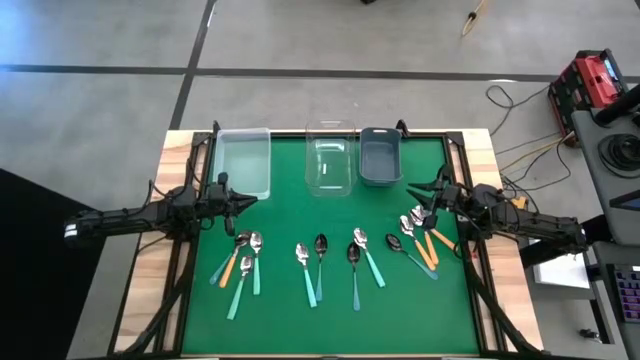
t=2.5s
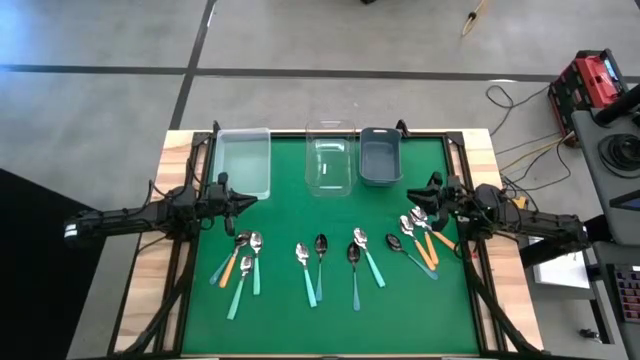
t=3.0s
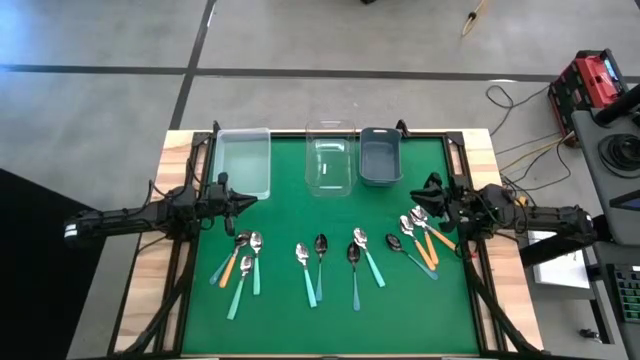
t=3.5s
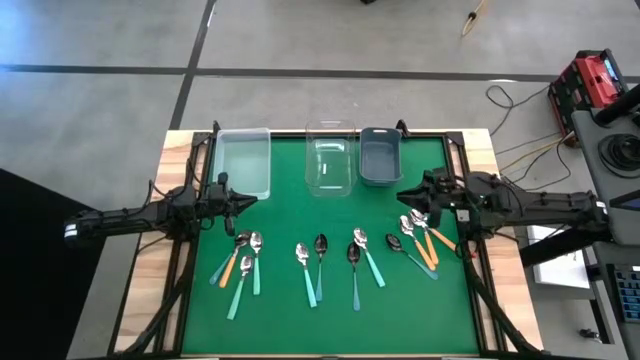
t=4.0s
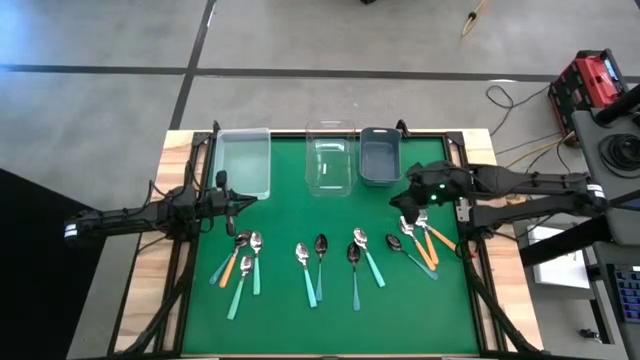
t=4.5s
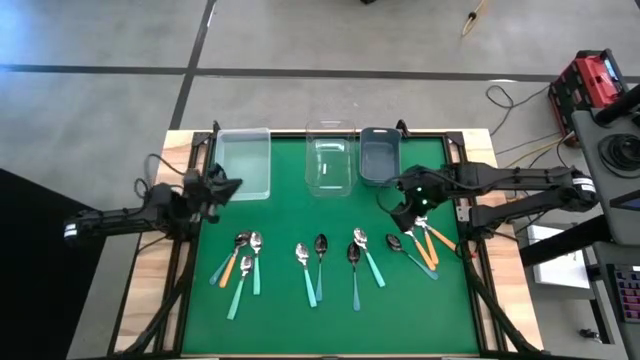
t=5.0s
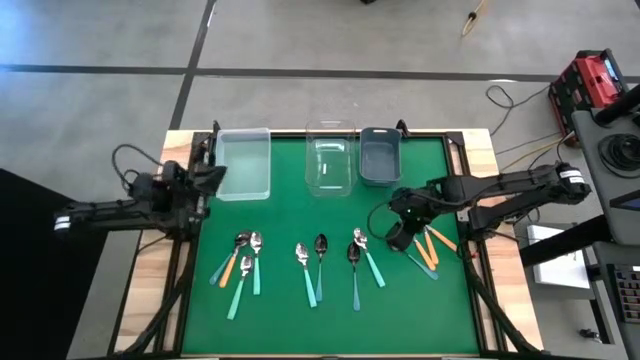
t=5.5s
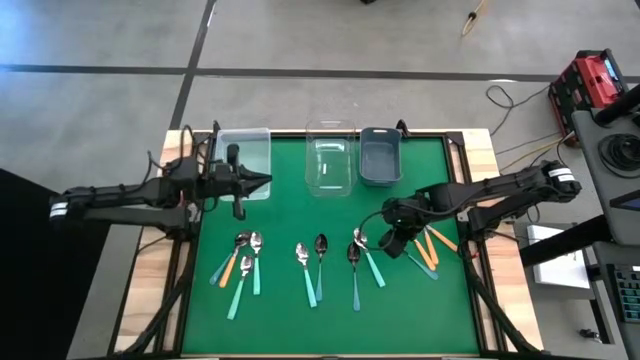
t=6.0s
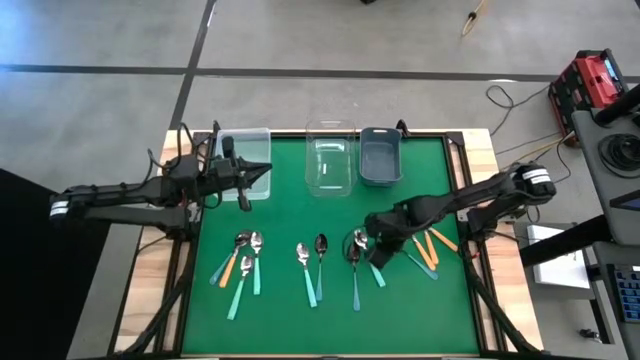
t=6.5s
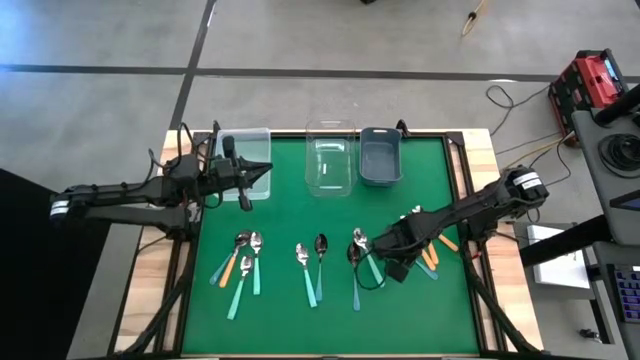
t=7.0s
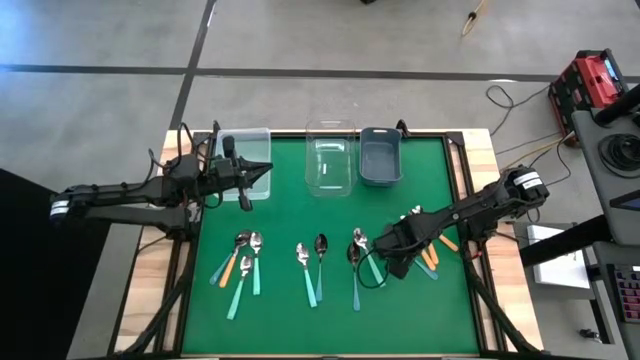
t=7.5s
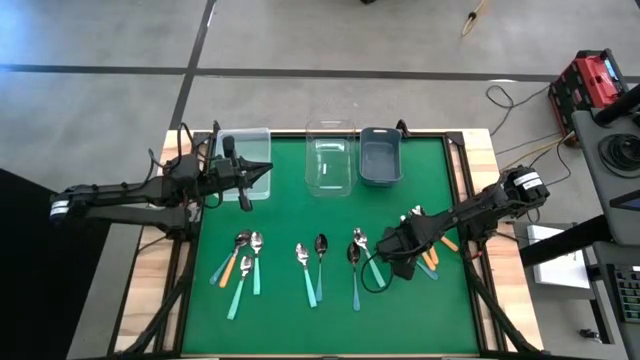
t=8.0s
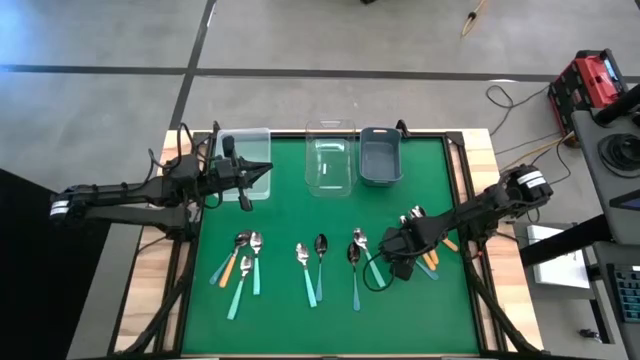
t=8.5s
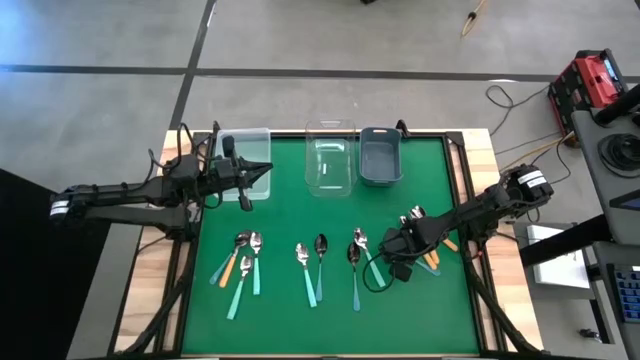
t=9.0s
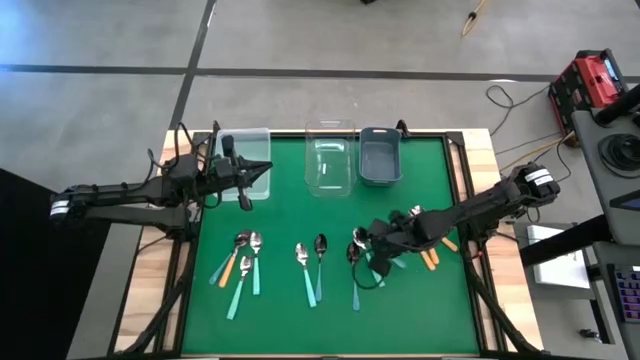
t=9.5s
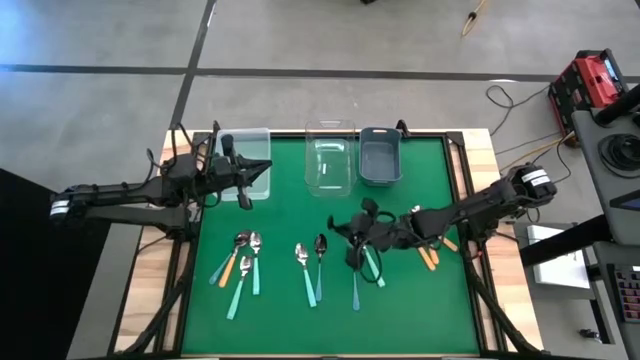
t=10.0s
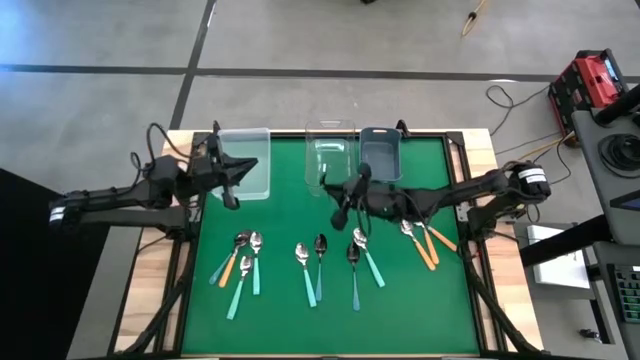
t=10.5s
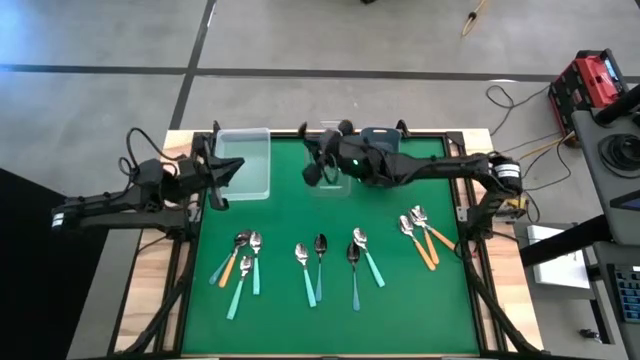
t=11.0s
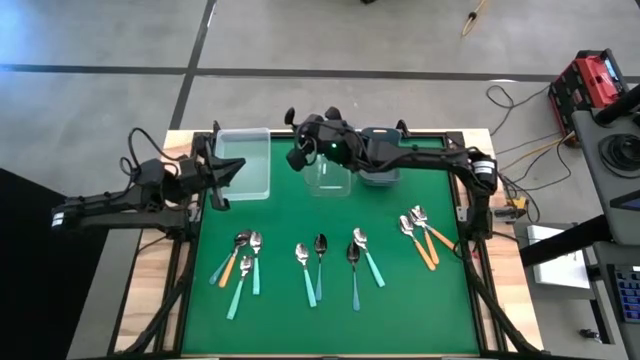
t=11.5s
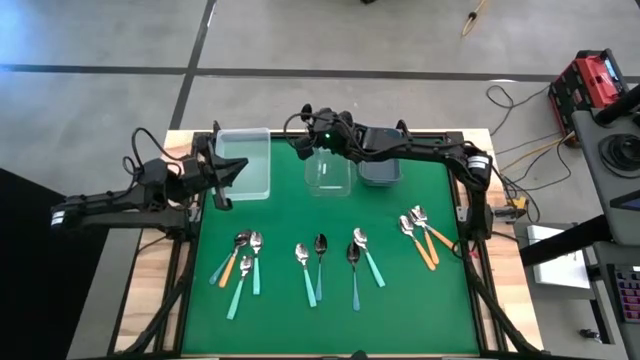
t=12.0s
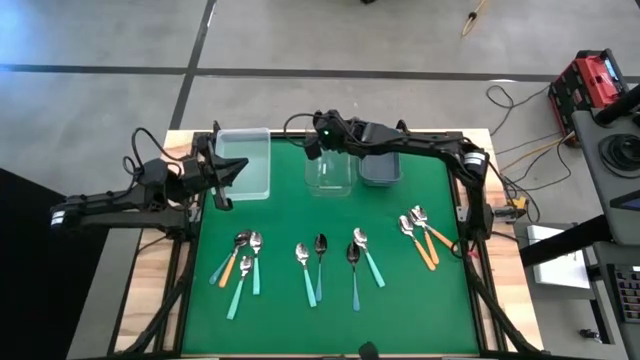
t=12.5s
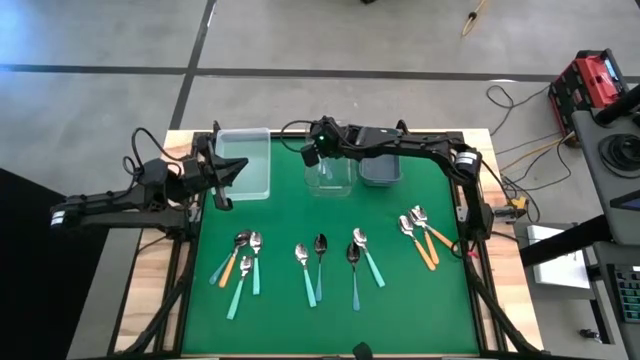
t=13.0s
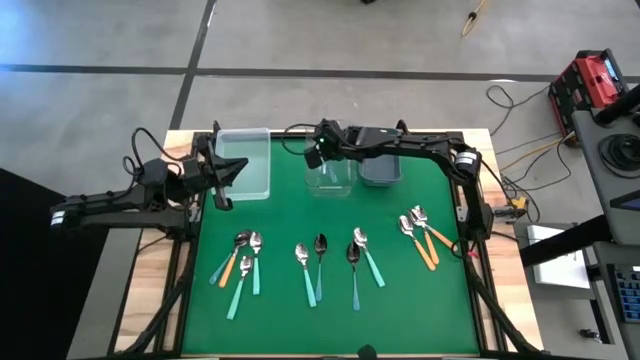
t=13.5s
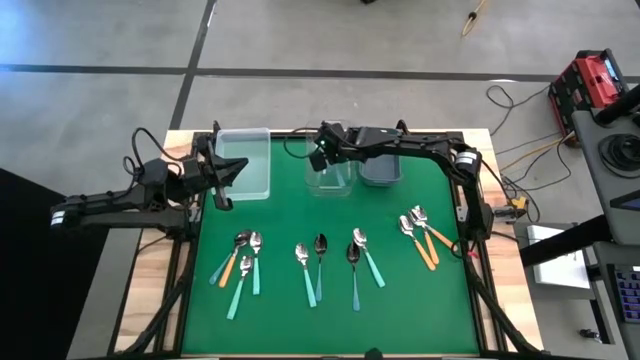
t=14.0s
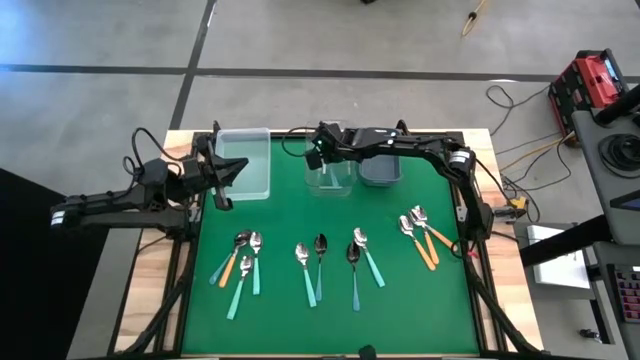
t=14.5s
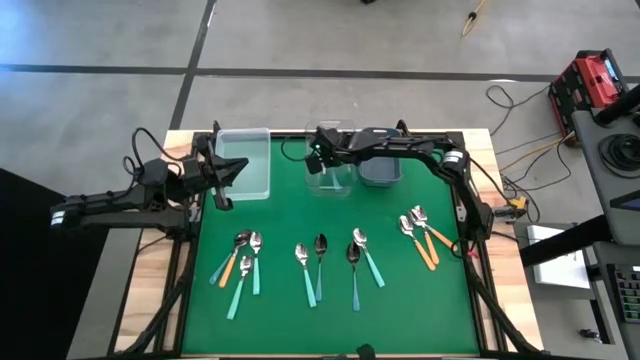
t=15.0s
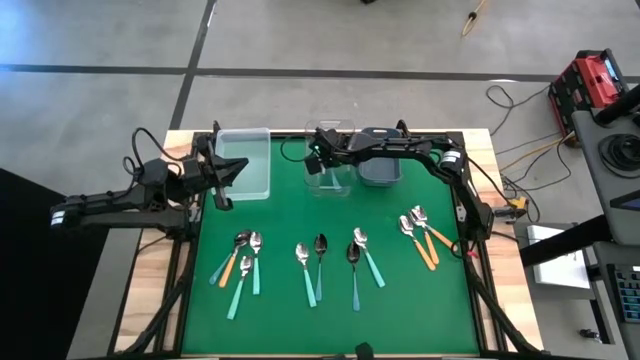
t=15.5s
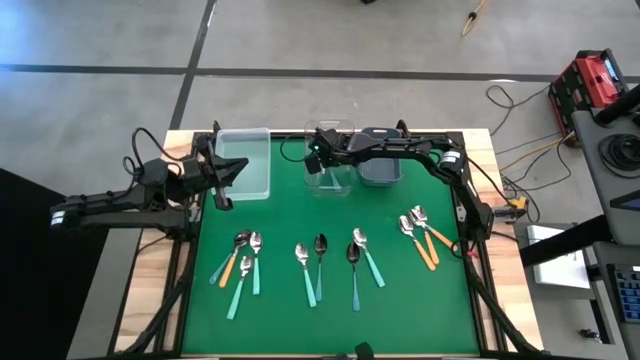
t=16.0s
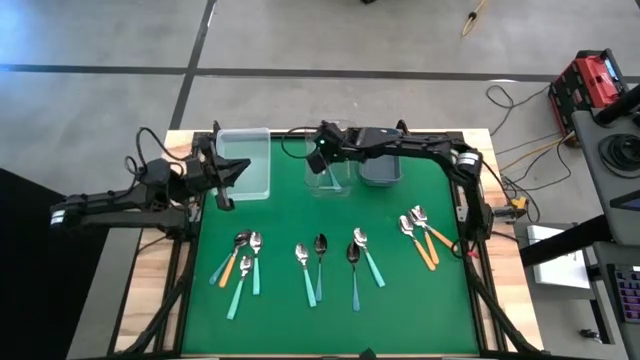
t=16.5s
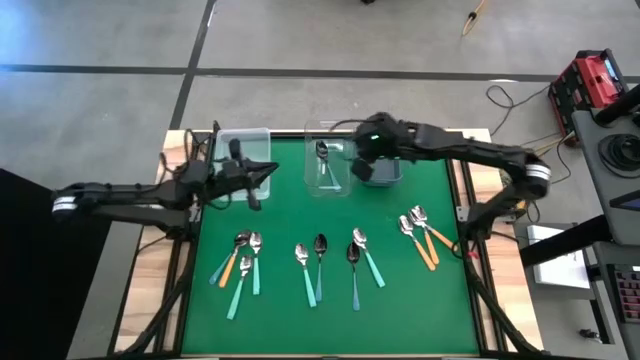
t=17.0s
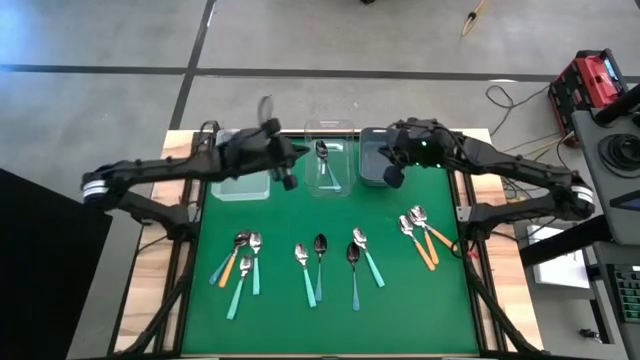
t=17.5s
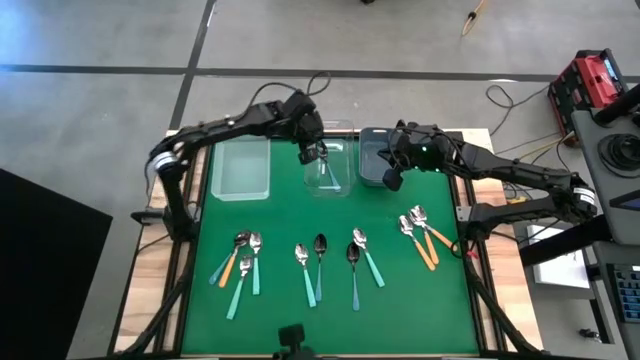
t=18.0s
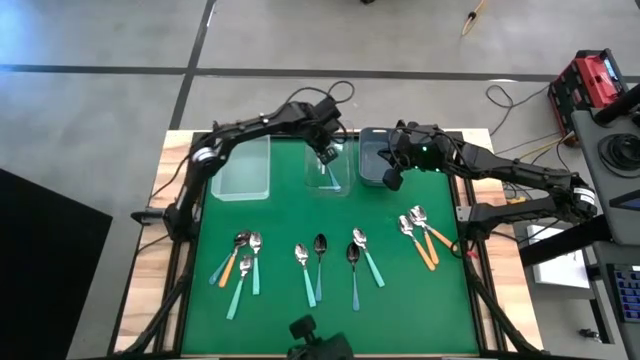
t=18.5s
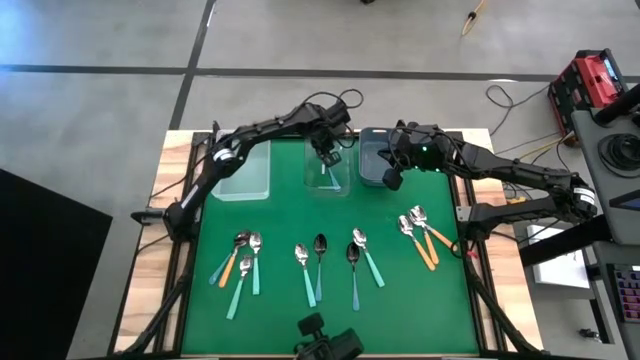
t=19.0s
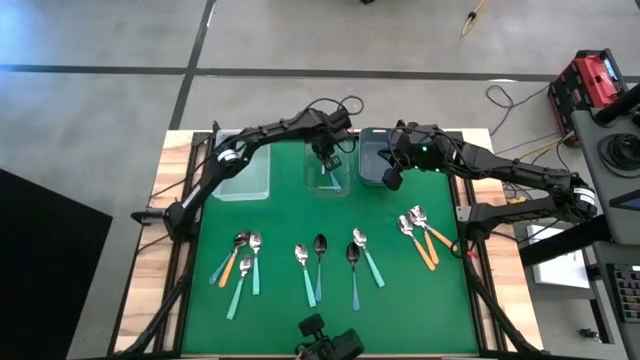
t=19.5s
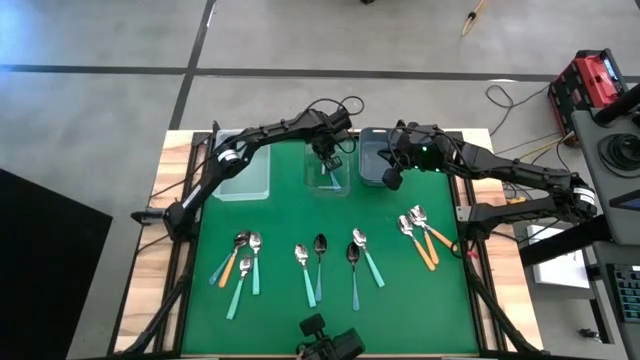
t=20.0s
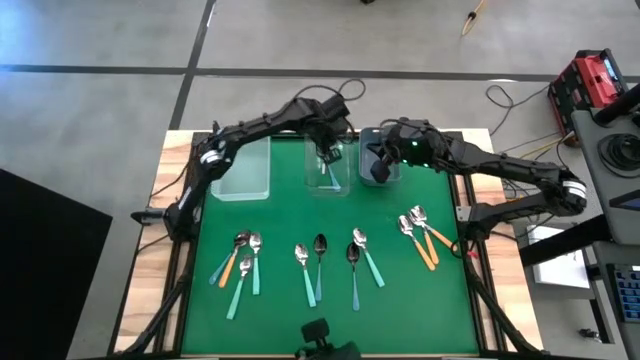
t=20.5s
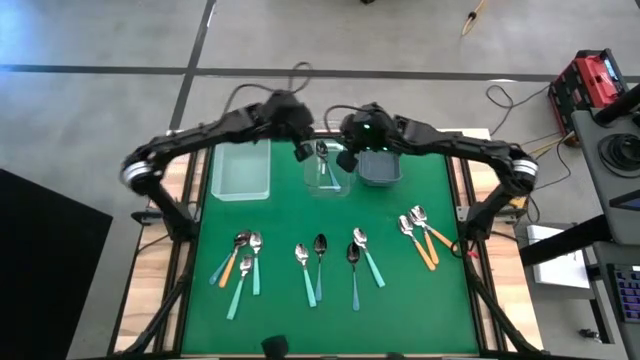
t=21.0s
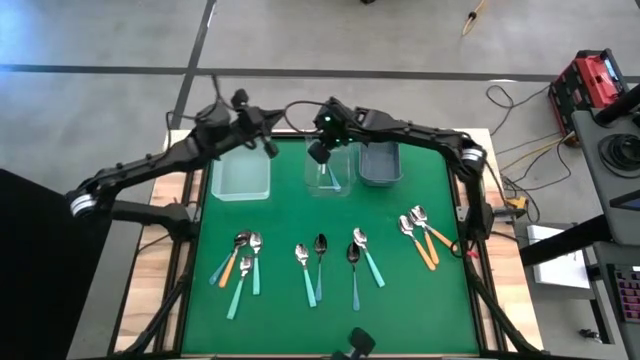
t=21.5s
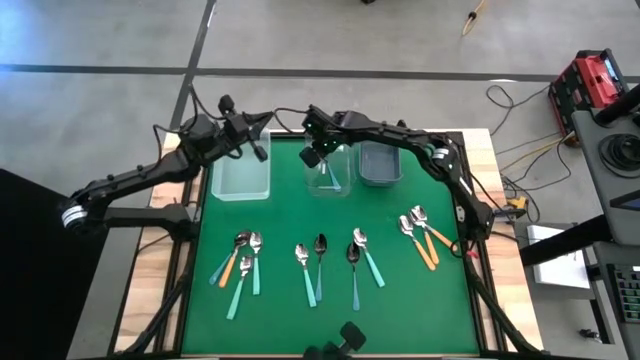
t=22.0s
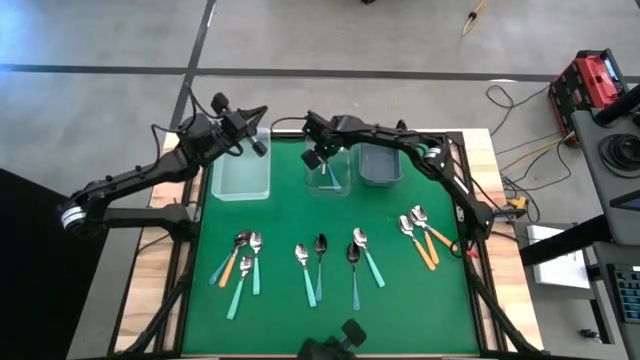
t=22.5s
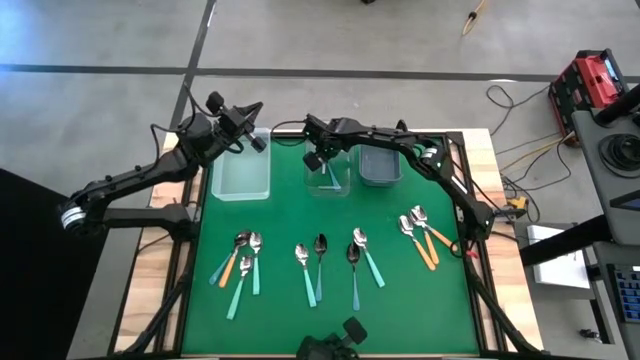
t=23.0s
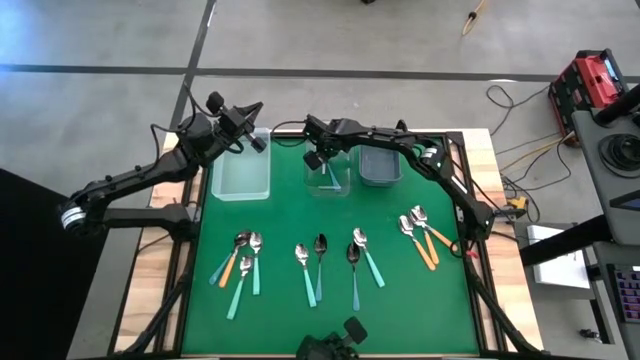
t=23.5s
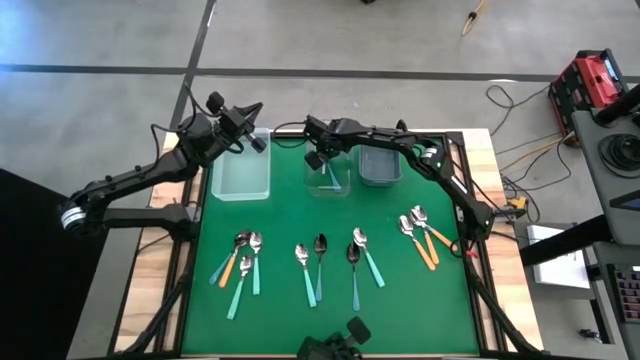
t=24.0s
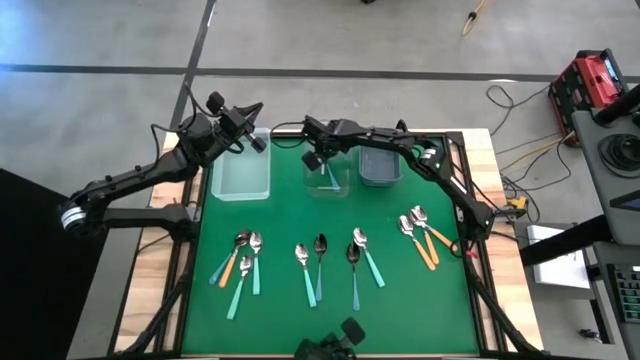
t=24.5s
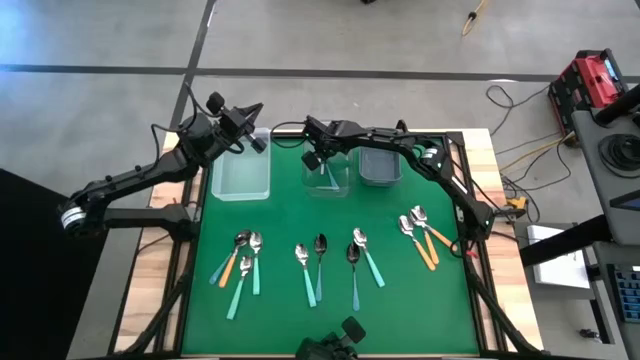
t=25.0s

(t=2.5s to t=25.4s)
Task: Sort silverware by color (type)
Put the blue spoon into the transparent bin
